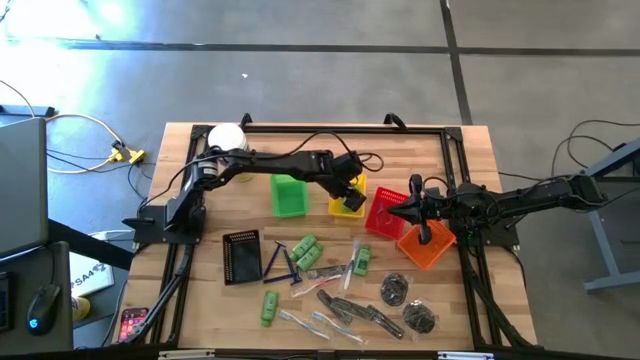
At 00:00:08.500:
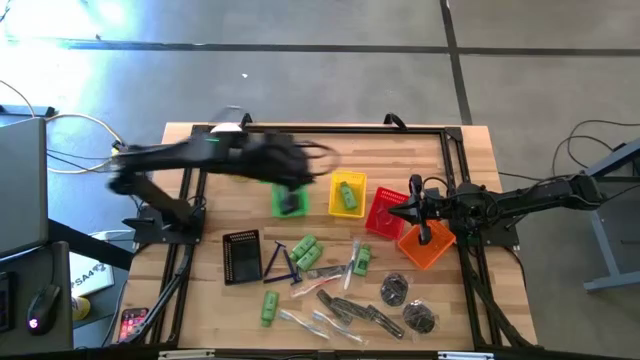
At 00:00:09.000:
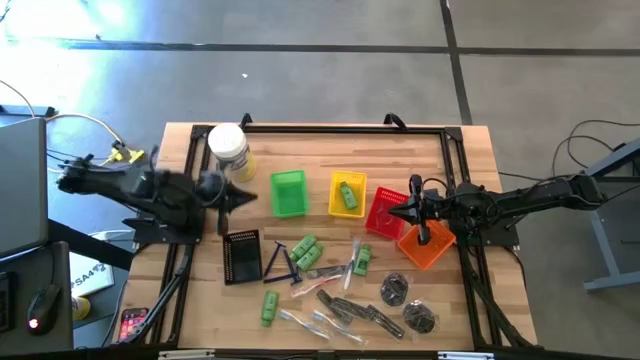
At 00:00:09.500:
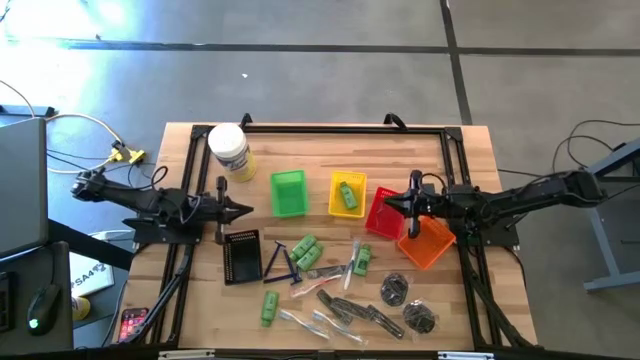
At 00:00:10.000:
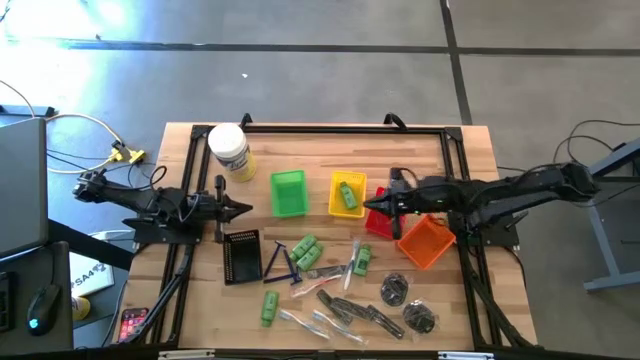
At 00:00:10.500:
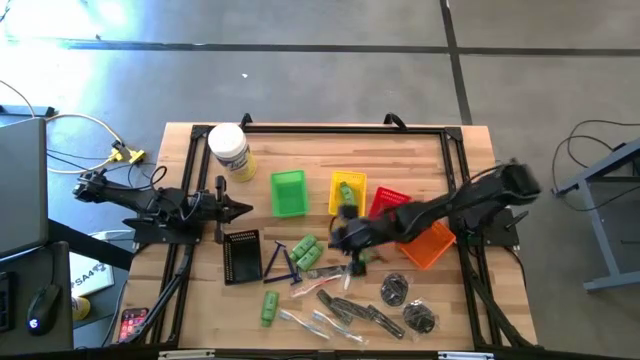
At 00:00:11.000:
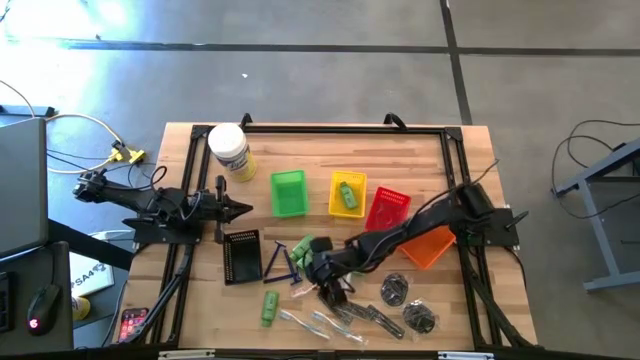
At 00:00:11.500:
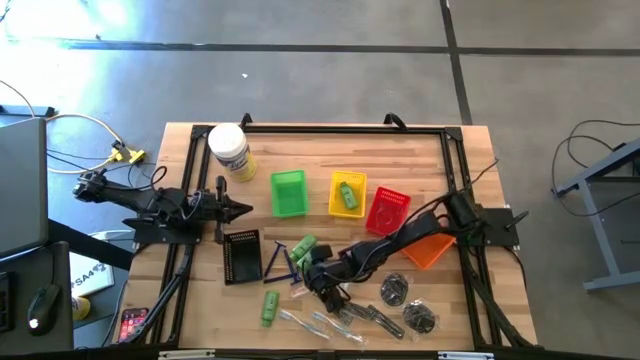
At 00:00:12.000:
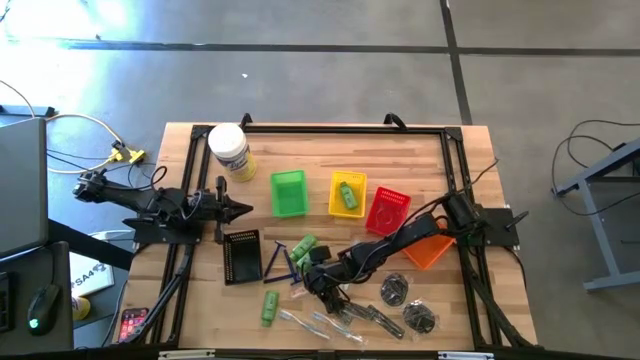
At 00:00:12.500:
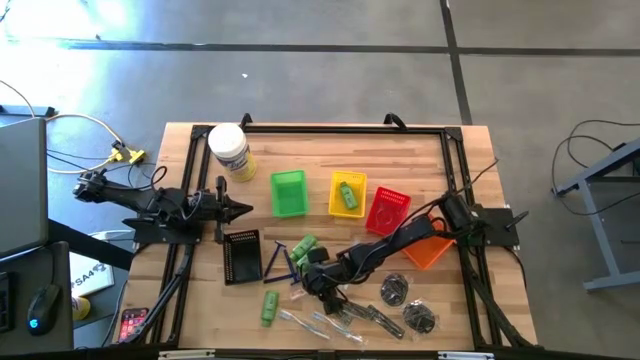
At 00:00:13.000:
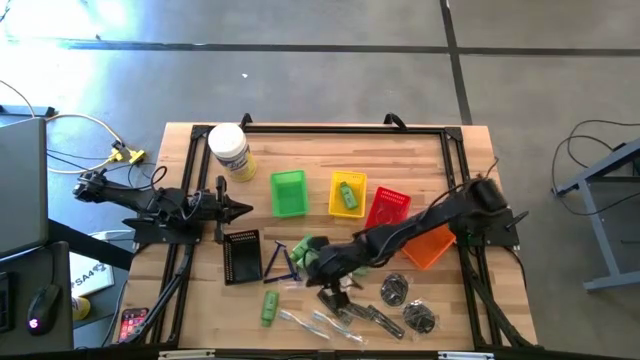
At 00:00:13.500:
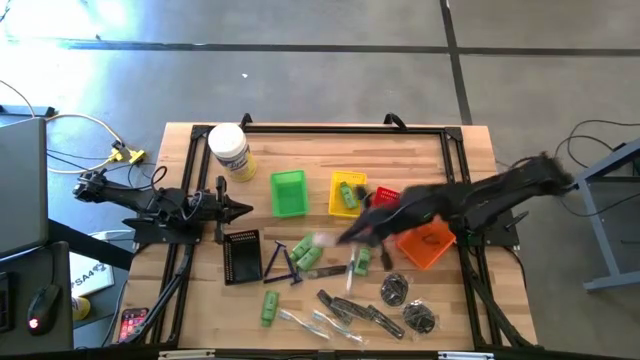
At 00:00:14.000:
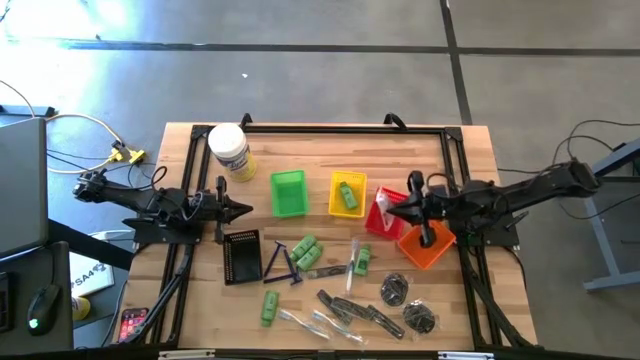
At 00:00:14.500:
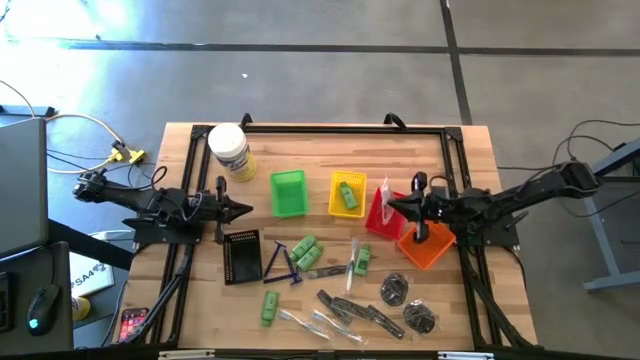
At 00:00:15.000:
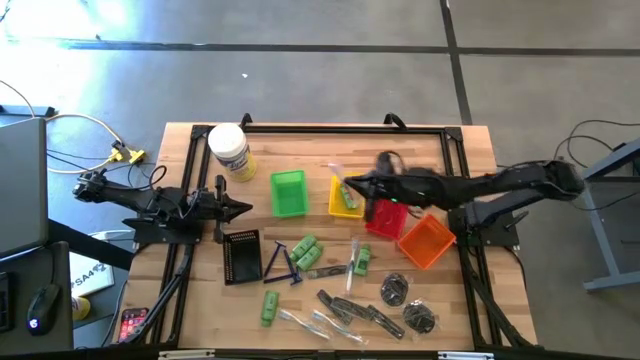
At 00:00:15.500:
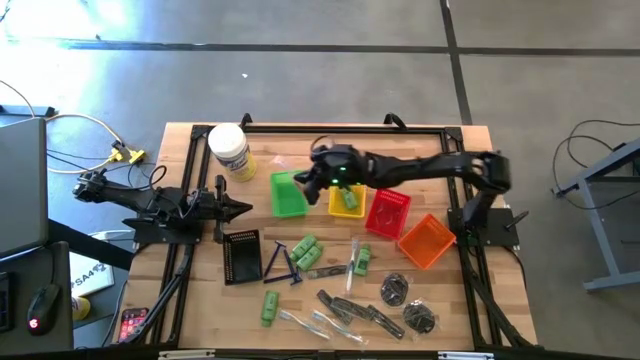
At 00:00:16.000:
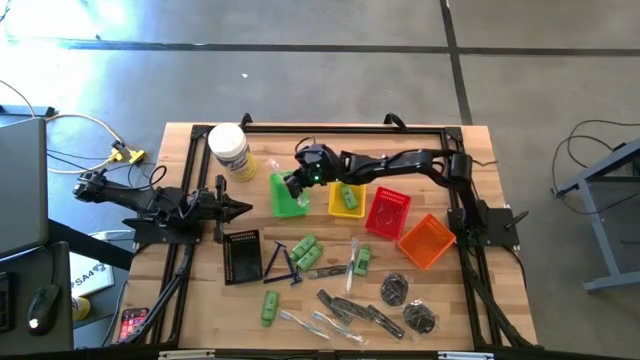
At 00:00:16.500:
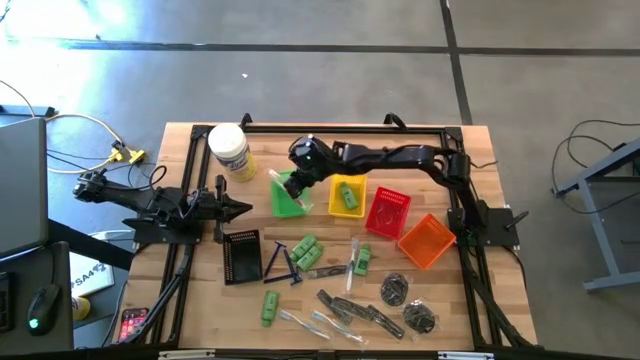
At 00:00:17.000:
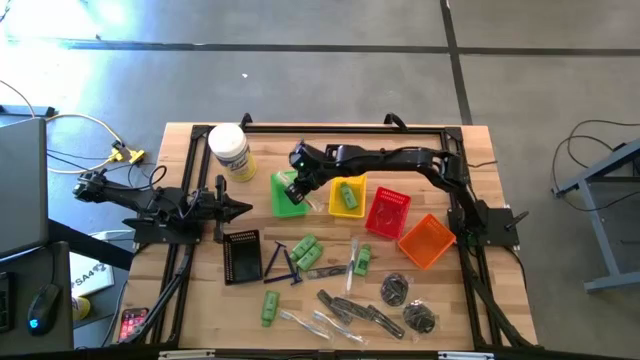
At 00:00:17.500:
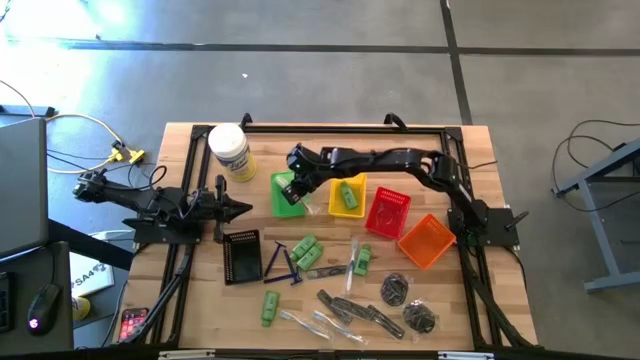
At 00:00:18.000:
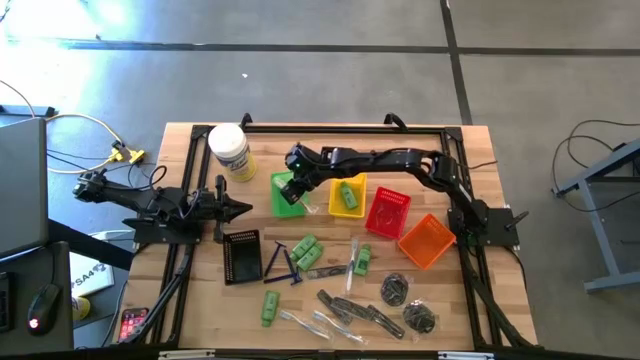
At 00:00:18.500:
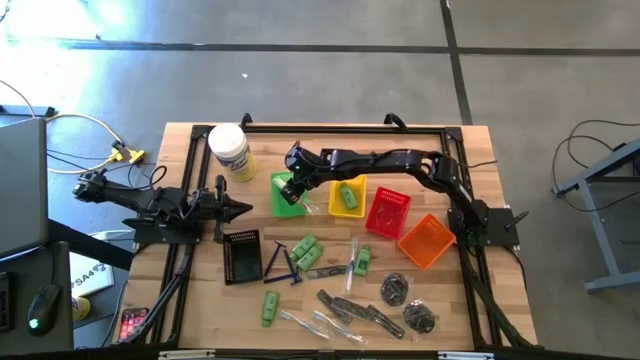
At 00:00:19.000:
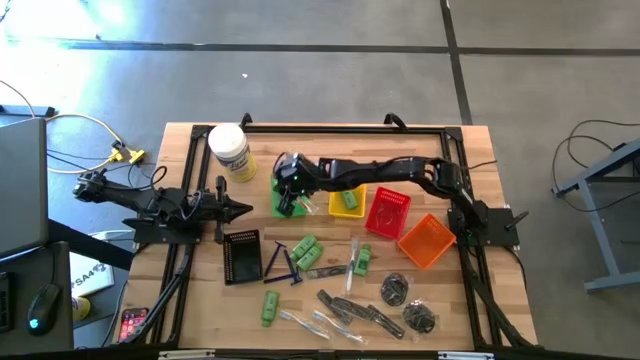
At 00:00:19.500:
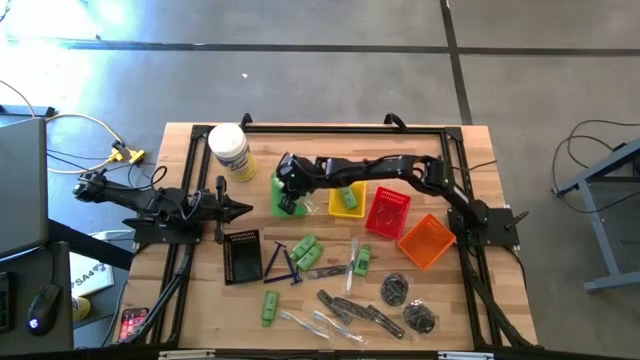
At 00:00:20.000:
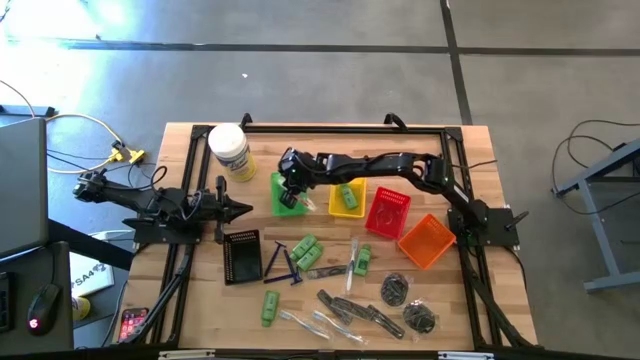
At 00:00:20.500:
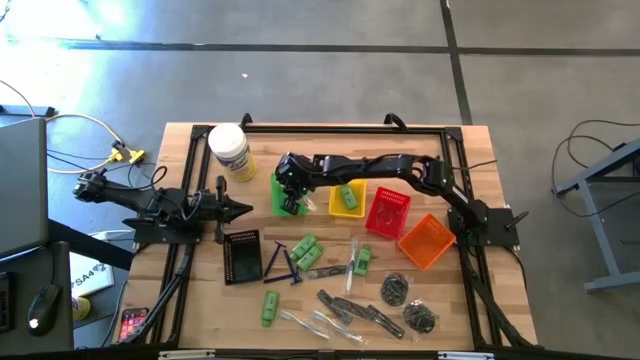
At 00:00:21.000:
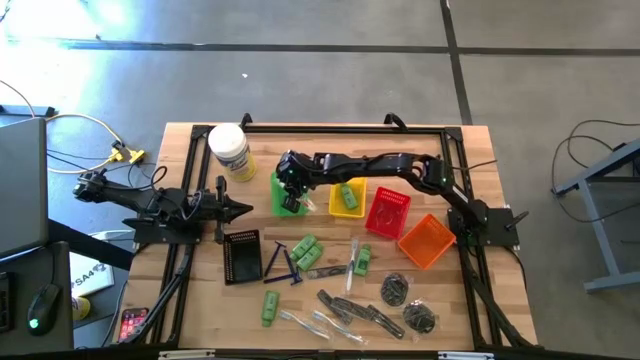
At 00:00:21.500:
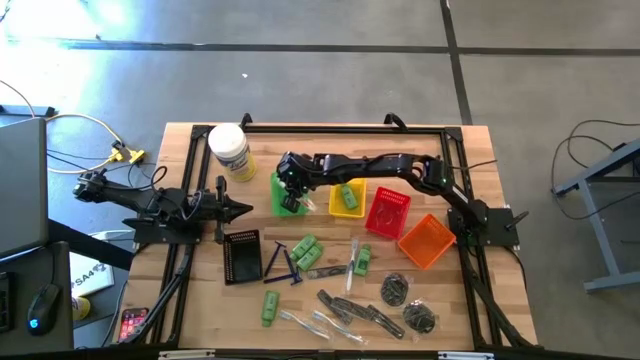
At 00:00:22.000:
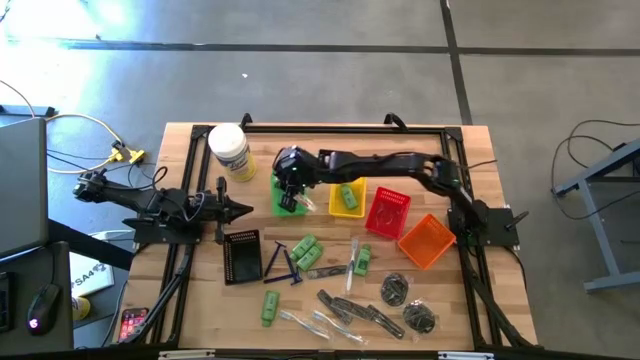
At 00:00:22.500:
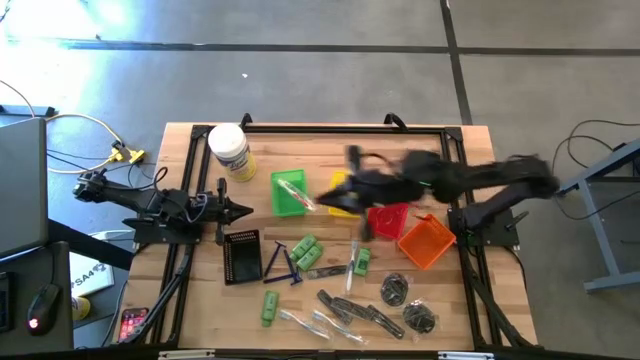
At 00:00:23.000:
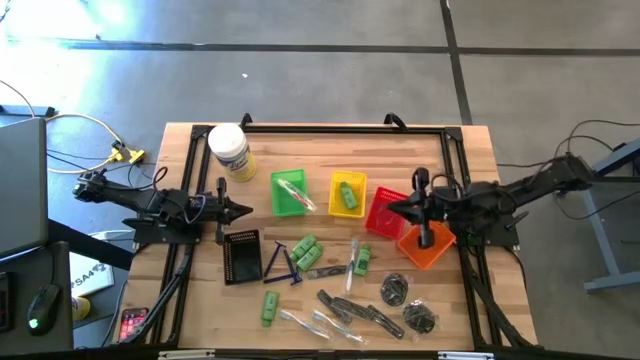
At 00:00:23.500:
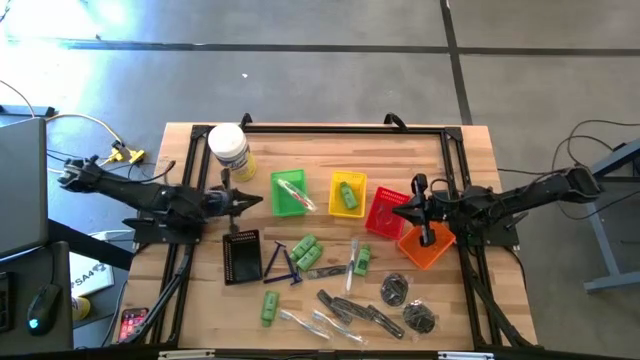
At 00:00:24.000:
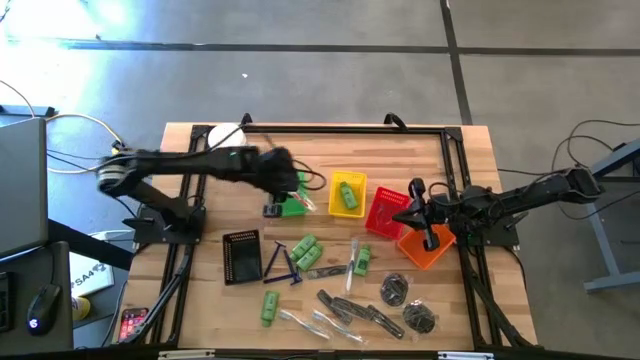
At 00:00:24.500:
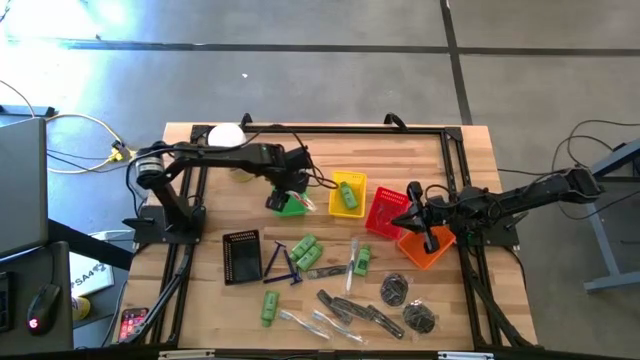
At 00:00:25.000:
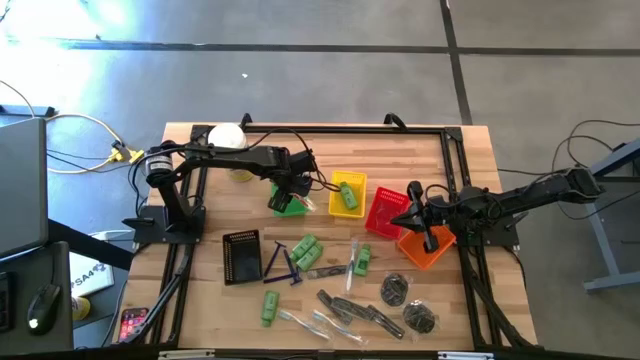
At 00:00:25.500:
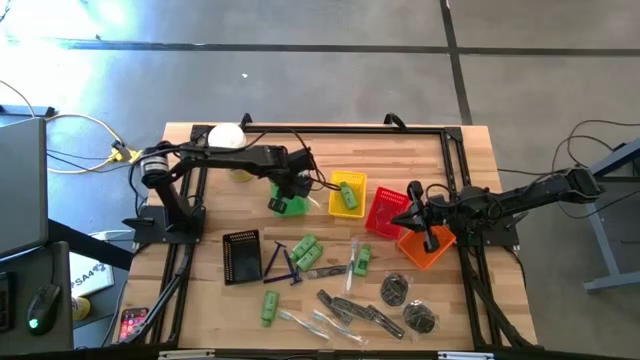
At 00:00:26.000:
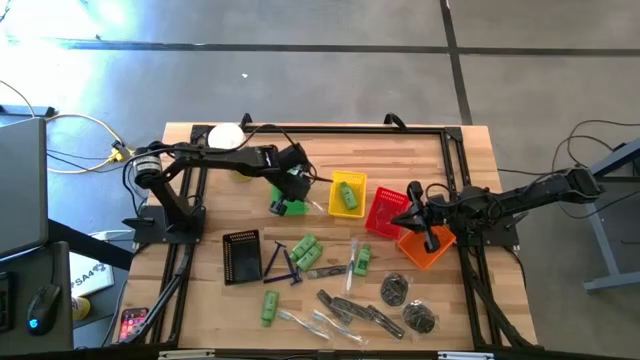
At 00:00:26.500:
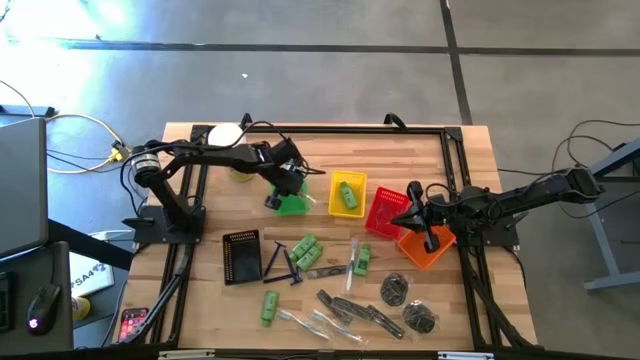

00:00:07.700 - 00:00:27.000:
Task: Pick & Place Travel size toiletries
Put the orange toothbrush into the green bin

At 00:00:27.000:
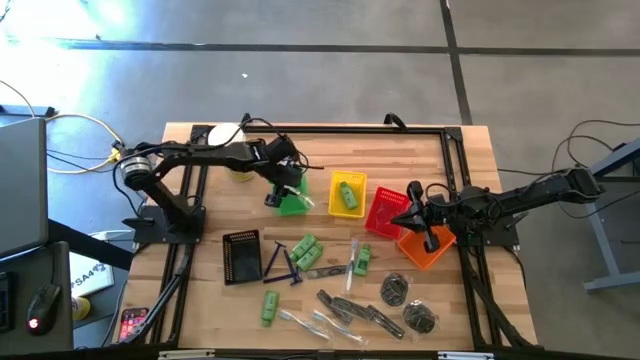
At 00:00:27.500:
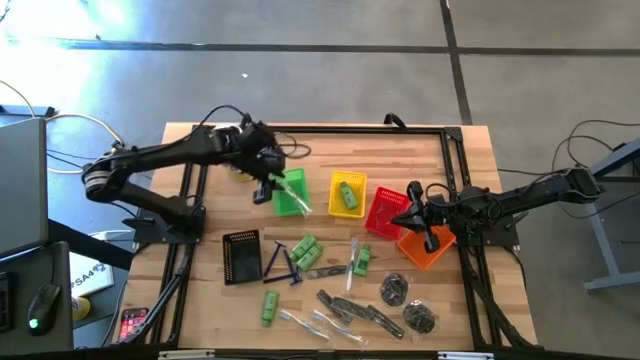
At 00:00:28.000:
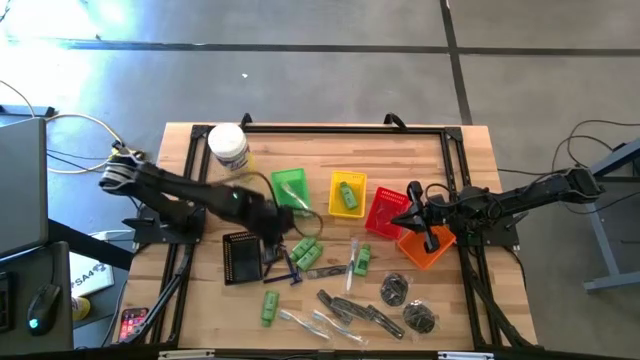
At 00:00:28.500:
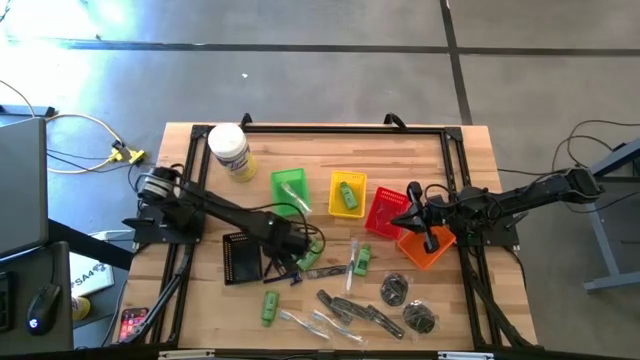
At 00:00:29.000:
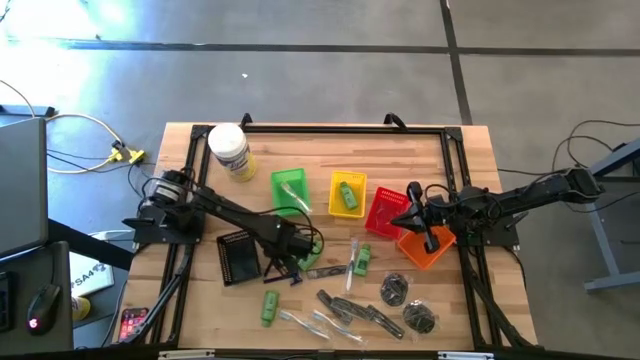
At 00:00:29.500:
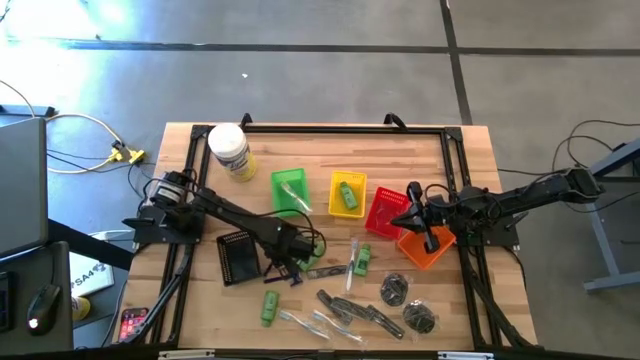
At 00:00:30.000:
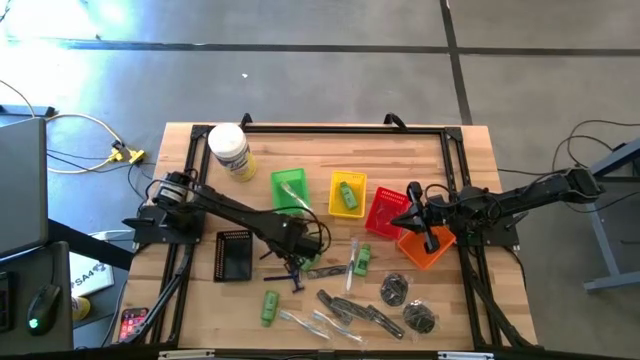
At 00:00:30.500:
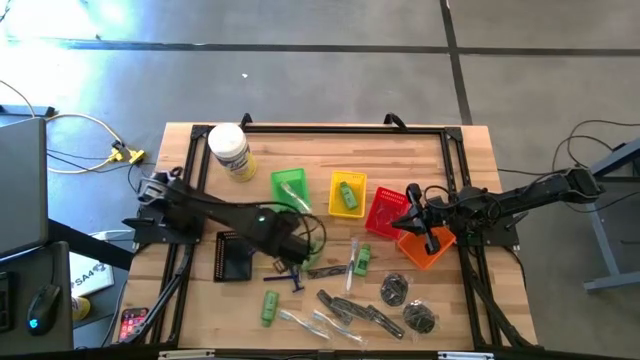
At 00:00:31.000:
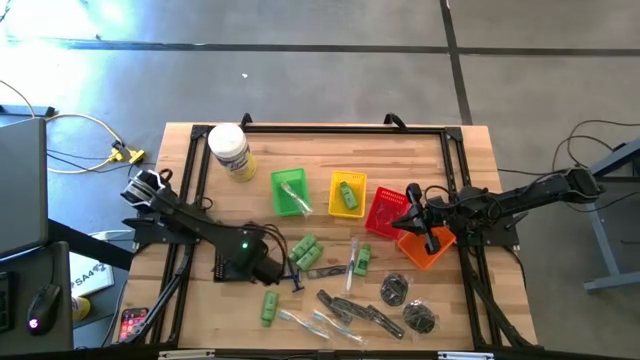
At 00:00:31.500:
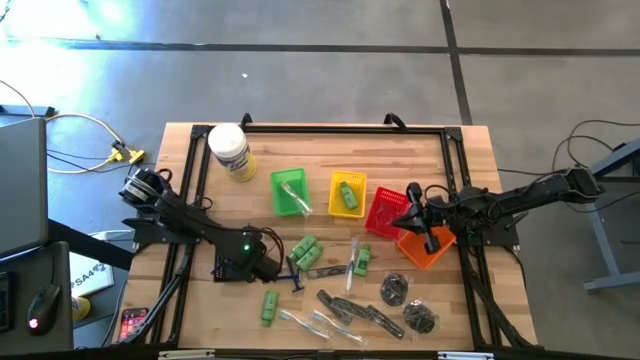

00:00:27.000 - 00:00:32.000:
Put the blue razor into the black bin
